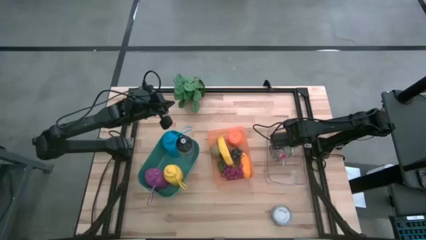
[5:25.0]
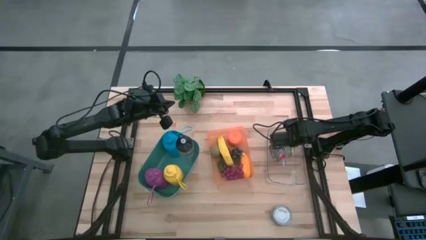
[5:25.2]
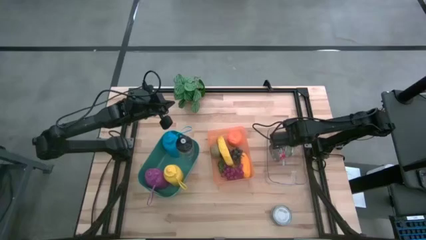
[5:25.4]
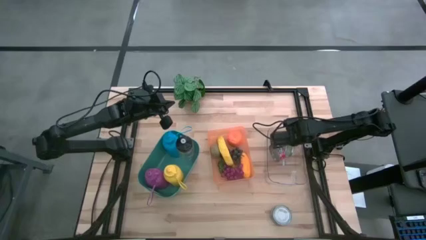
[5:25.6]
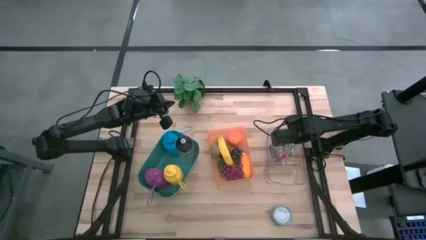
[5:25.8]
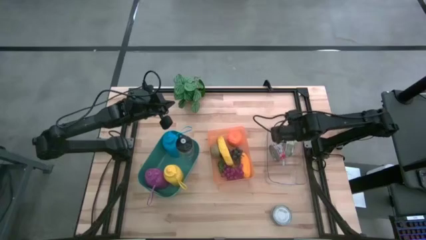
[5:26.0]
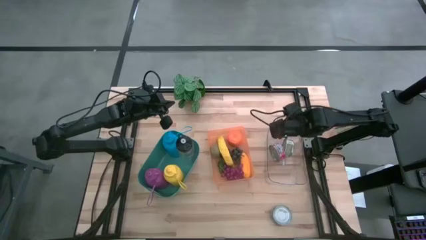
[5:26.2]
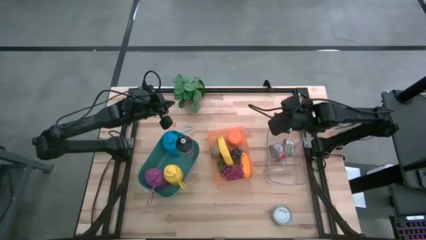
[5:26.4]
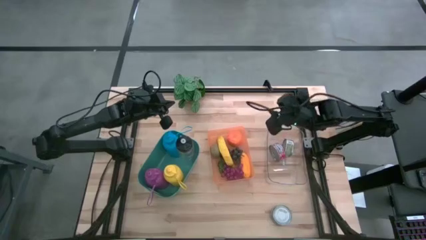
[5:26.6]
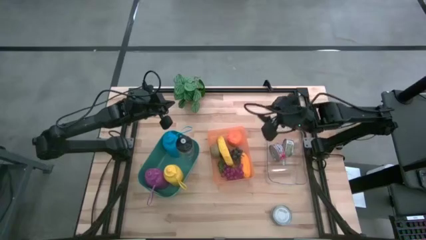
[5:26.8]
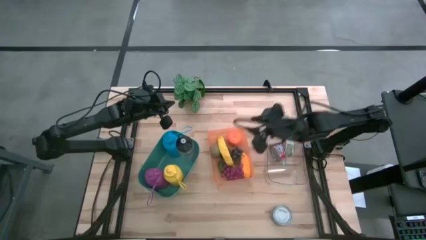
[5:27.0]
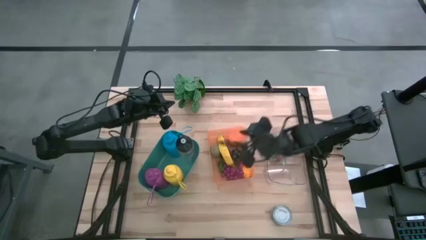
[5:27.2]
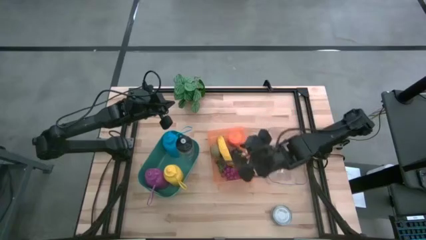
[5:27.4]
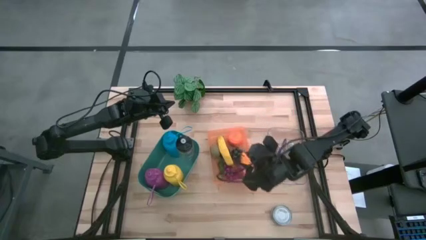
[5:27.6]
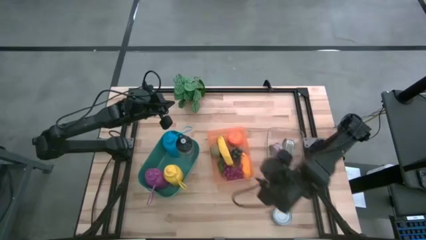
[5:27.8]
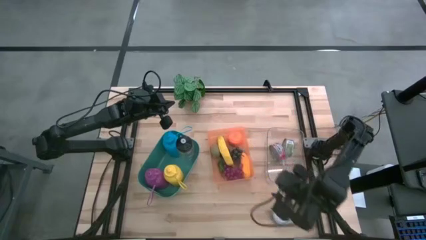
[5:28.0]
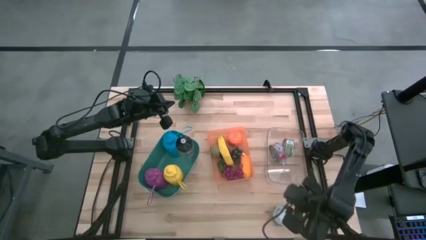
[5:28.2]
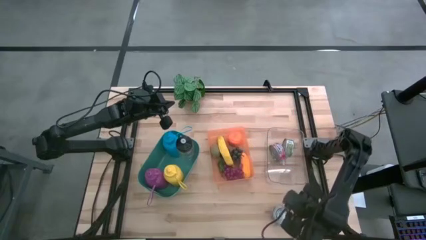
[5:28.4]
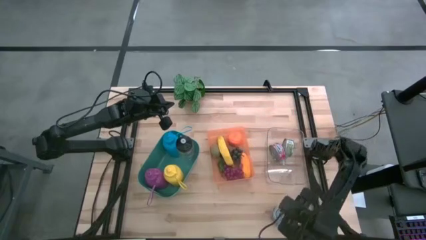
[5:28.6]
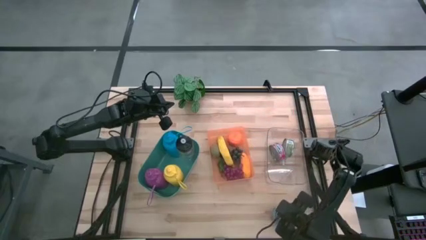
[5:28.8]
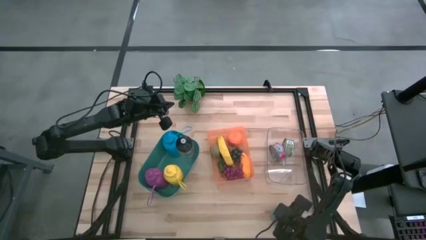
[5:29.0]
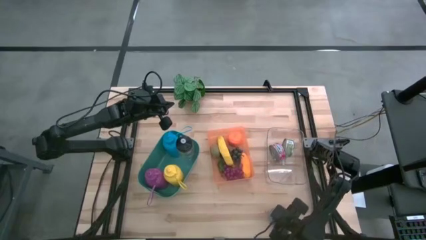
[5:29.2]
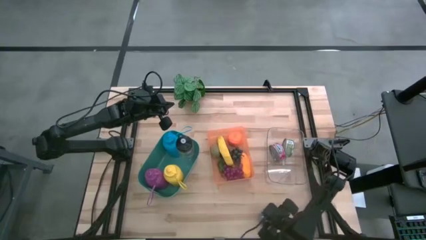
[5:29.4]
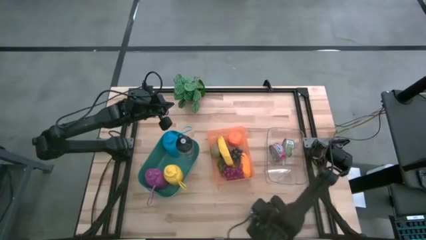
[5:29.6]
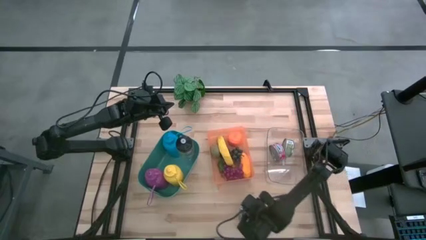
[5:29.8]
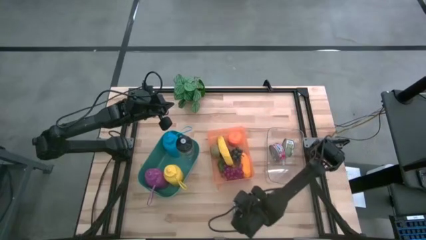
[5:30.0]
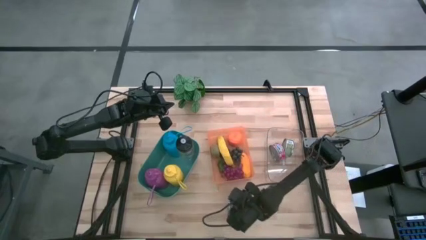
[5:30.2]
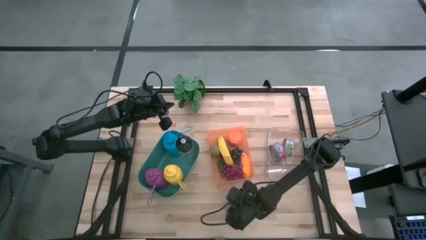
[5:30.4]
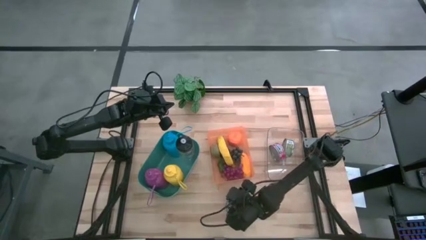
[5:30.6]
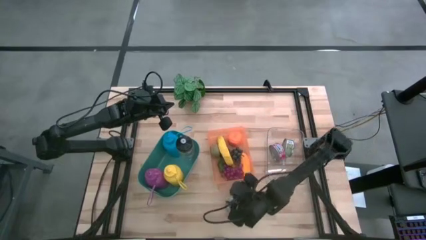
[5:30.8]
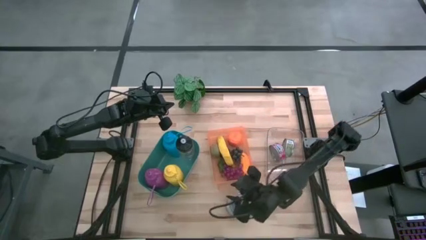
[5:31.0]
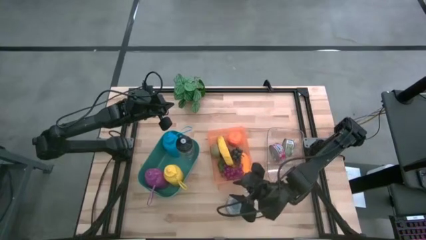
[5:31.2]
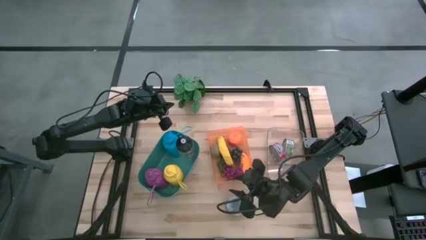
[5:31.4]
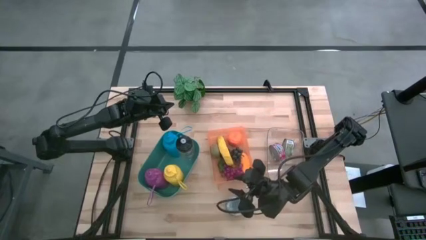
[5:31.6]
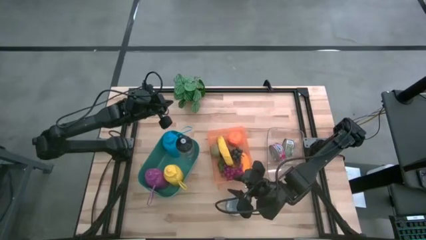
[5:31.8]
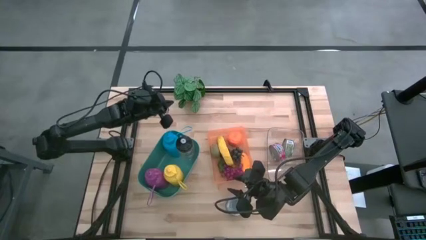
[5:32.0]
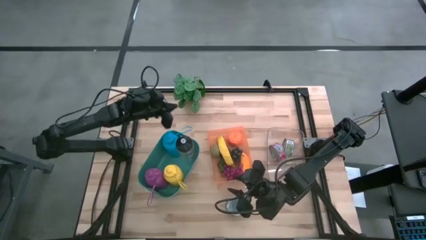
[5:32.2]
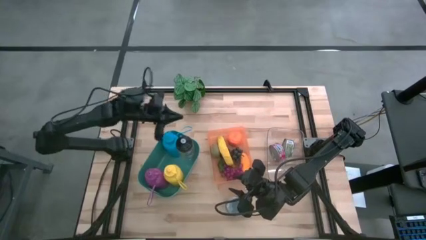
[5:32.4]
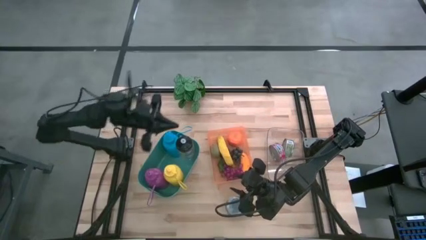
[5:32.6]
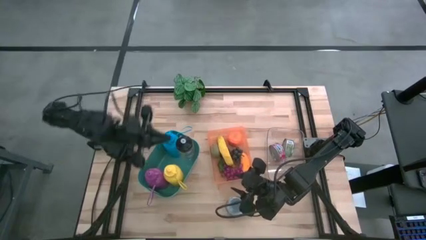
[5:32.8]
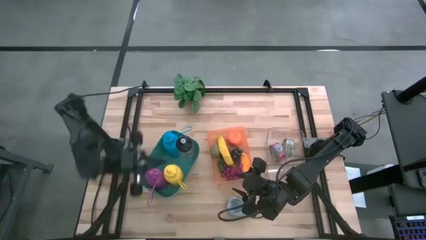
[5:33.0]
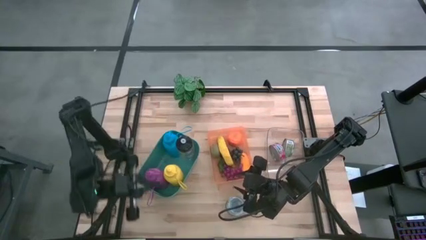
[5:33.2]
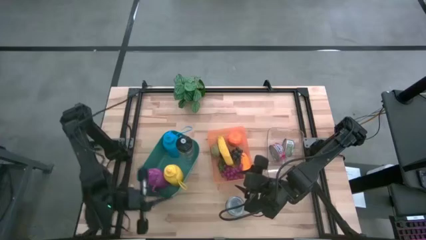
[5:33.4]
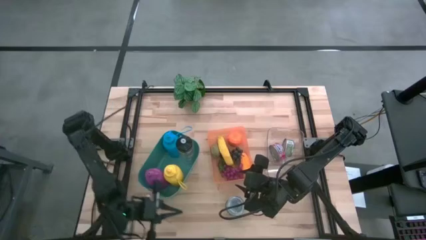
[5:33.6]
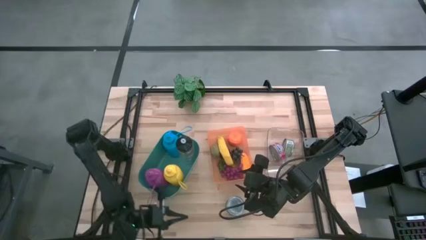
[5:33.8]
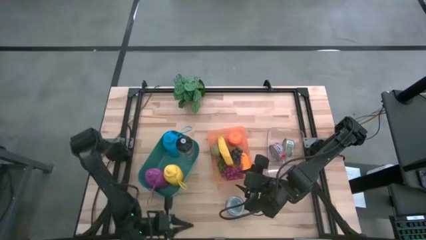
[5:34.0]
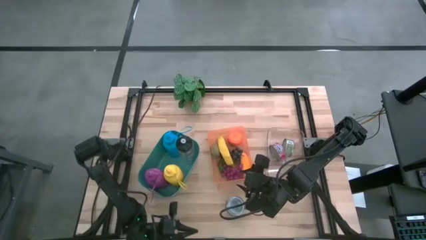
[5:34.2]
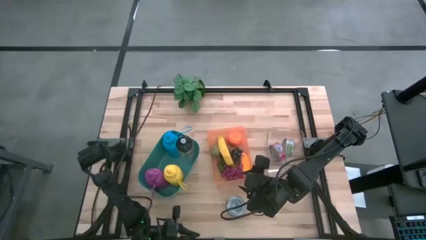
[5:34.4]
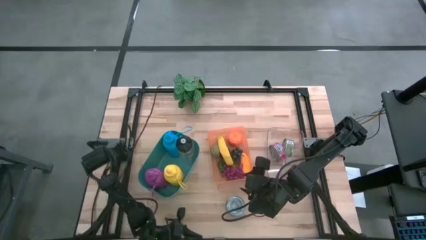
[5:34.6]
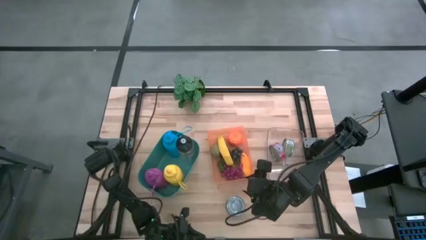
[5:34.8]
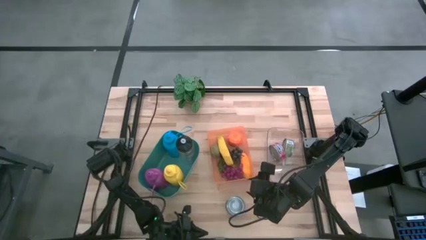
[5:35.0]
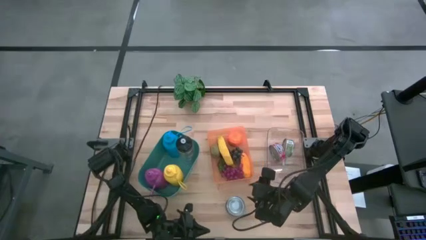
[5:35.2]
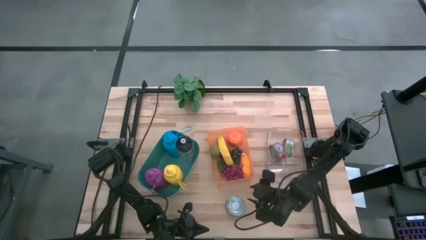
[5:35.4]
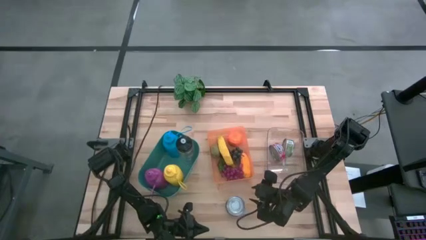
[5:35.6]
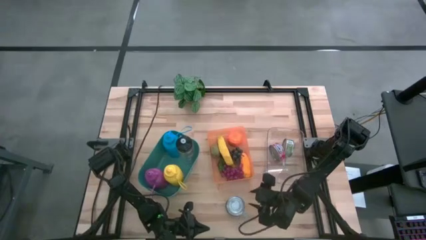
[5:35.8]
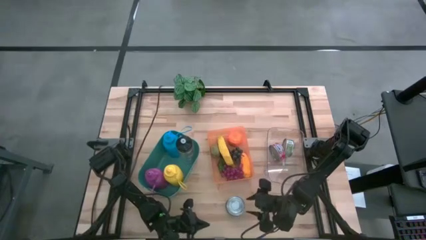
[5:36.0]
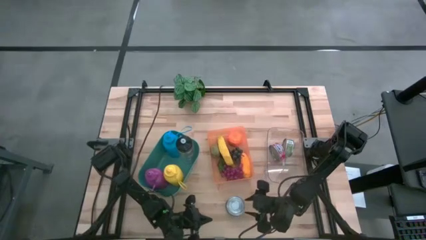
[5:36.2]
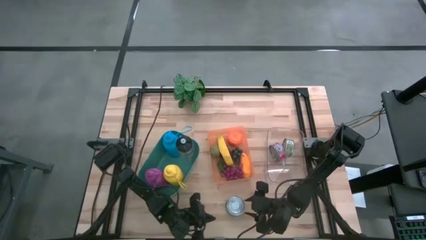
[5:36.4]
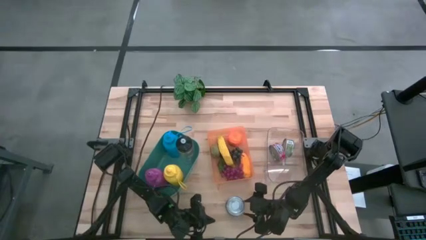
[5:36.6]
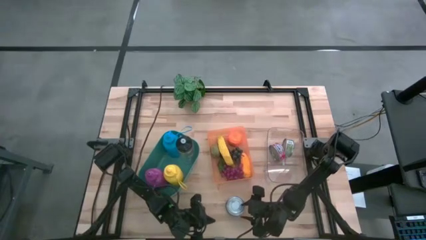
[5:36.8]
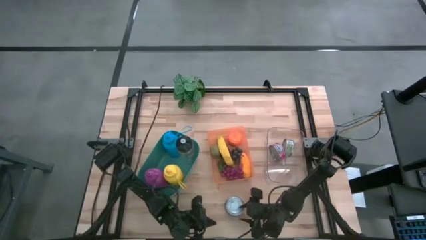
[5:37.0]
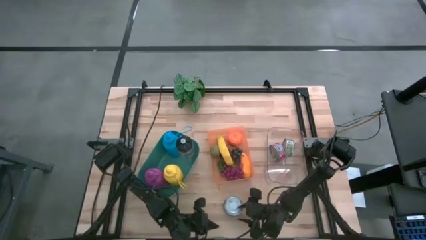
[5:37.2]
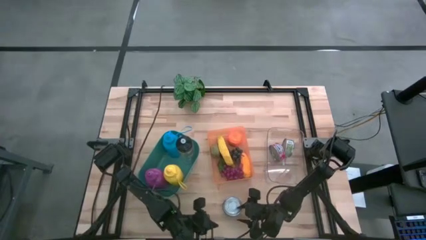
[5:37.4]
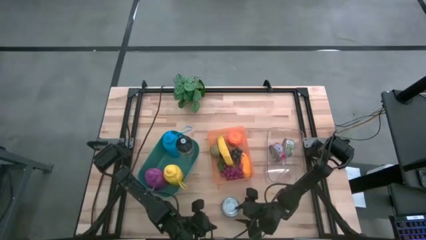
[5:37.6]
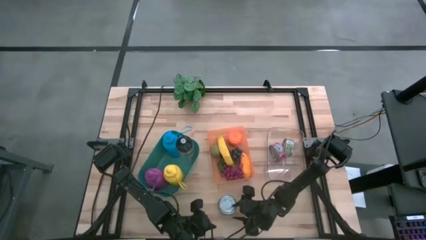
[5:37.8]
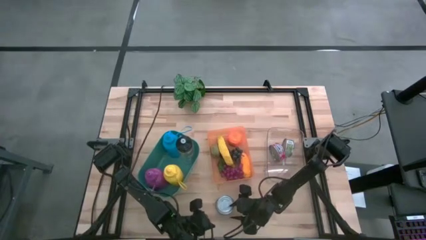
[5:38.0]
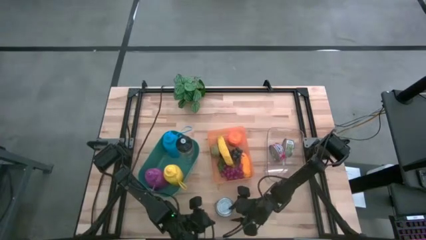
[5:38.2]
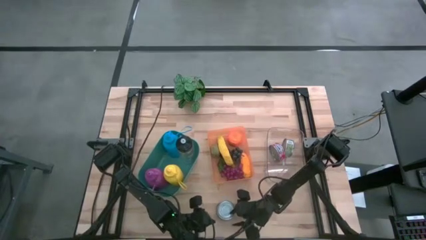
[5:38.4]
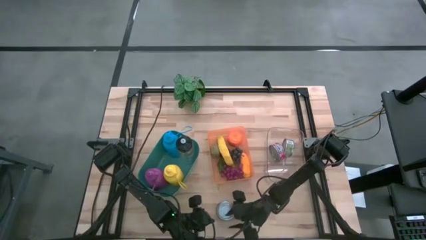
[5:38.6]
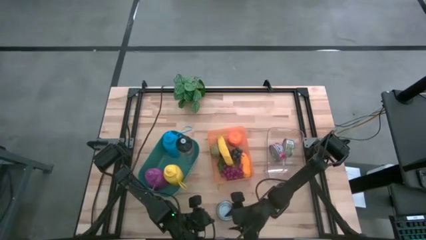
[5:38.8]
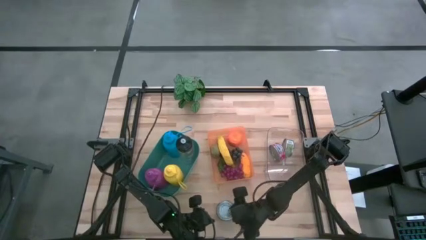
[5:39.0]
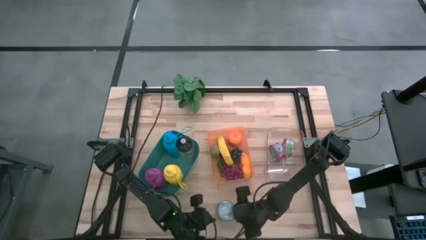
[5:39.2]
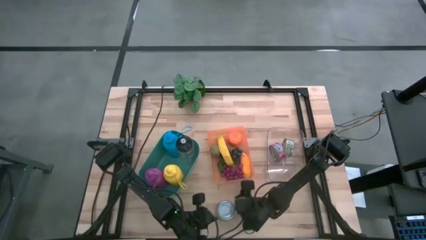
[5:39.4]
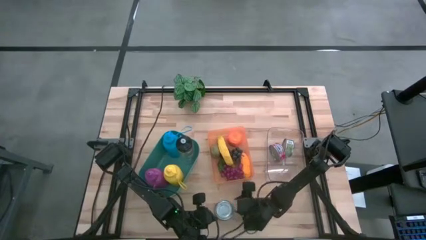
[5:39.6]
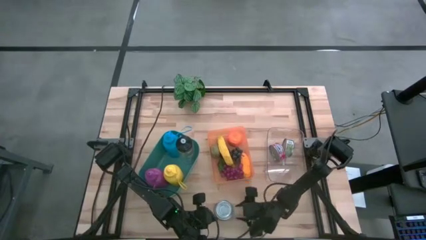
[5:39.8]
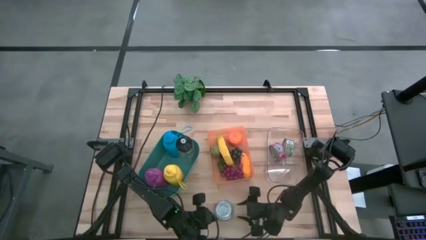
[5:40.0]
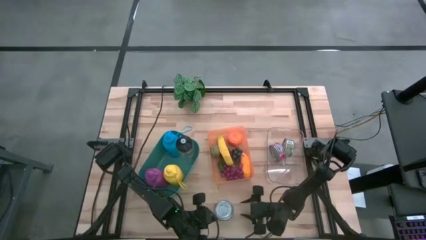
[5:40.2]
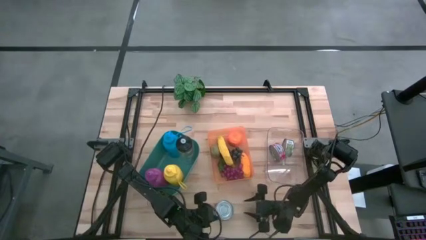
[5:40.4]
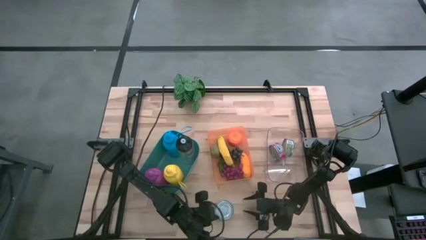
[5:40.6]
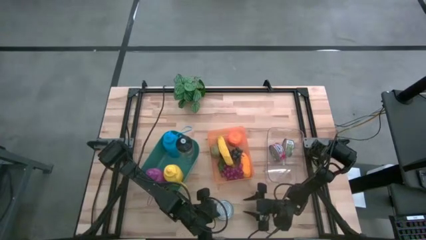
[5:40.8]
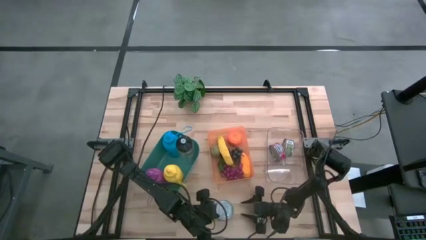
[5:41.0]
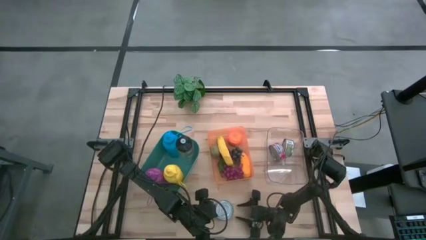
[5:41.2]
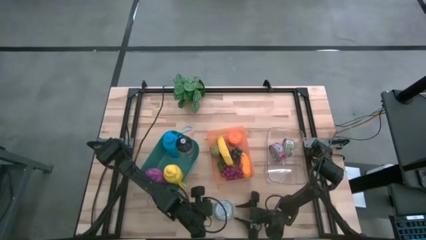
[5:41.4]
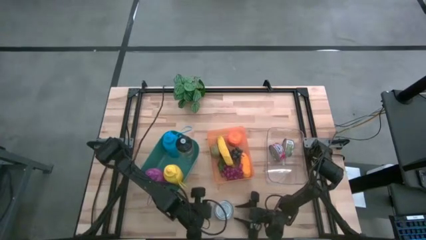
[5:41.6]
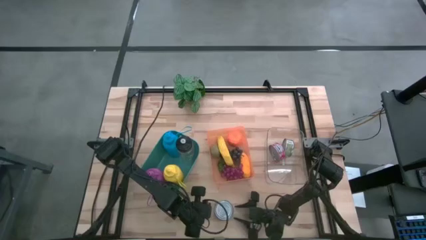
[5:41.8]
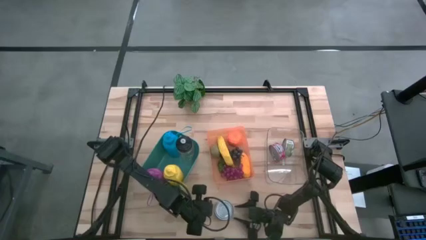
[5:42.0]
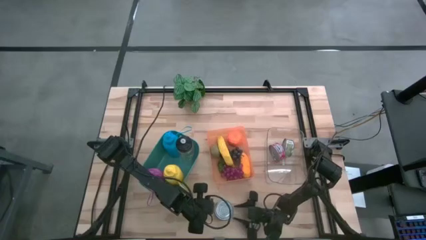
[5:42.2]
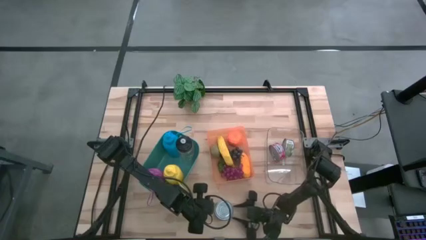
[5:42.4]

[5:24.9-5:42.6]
Task: Pick & Place Food Item
Put the green tuna can into the transparent bin
